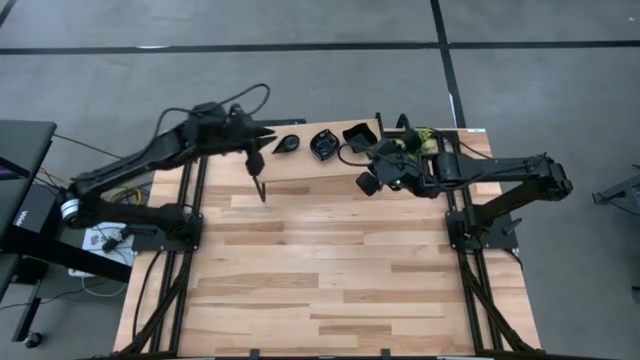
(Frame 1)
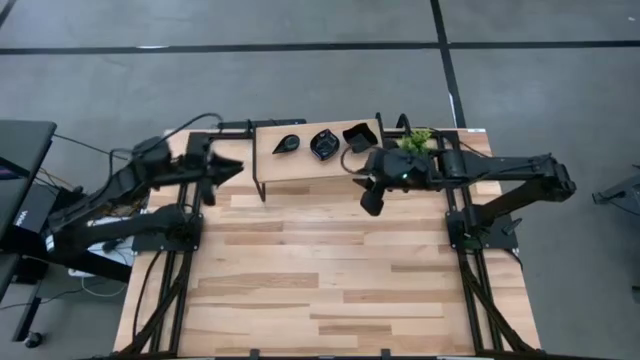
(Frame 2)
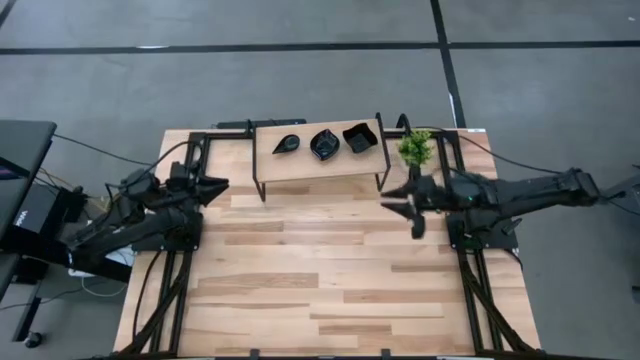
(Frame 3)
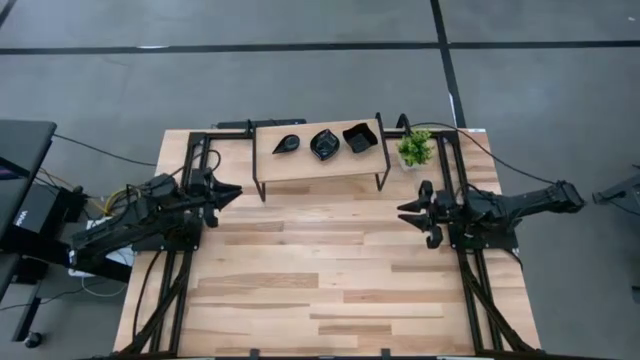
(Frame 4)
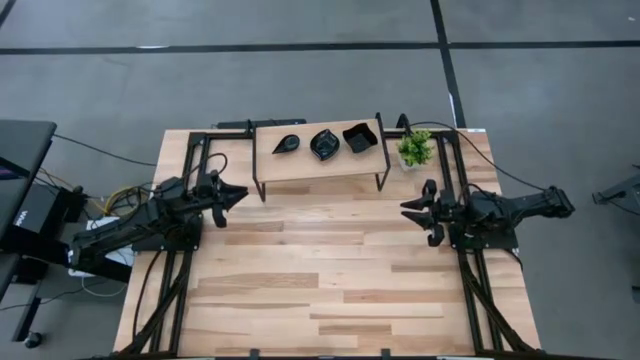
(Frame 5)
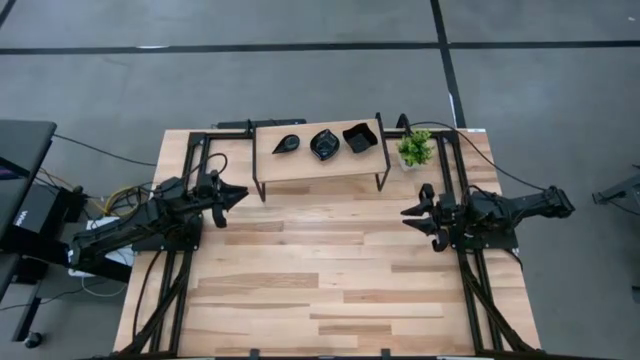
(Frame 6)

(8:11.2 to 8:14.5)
Task: Pick & Place Mini shaped plates
Return to Home Position

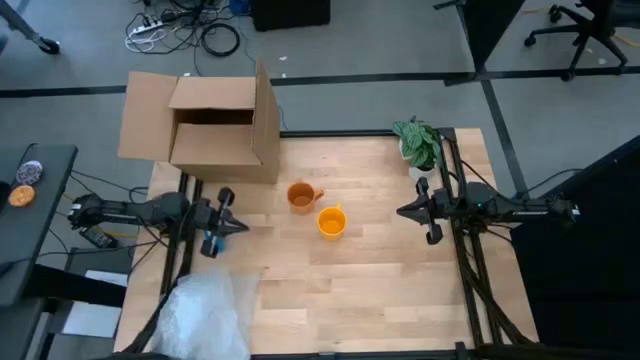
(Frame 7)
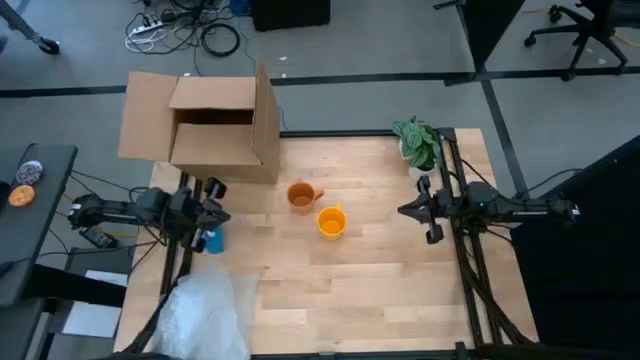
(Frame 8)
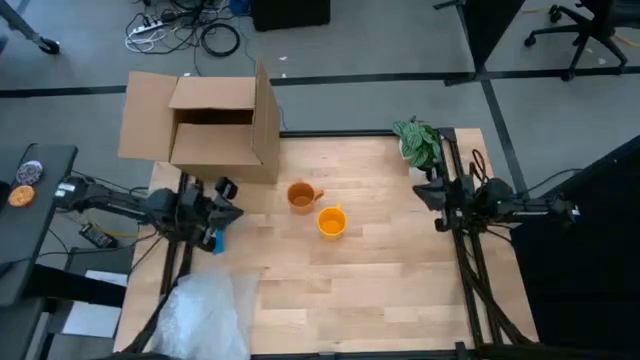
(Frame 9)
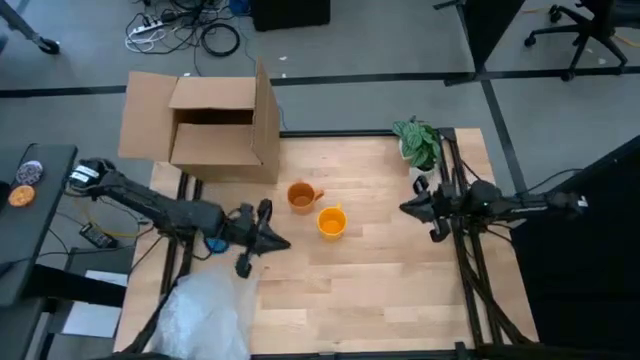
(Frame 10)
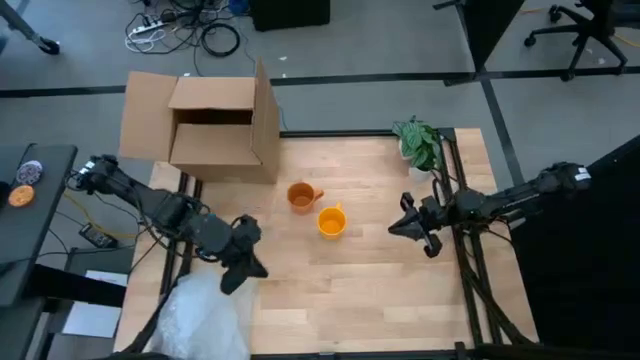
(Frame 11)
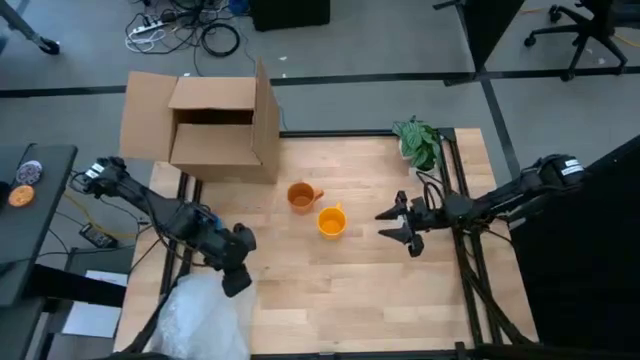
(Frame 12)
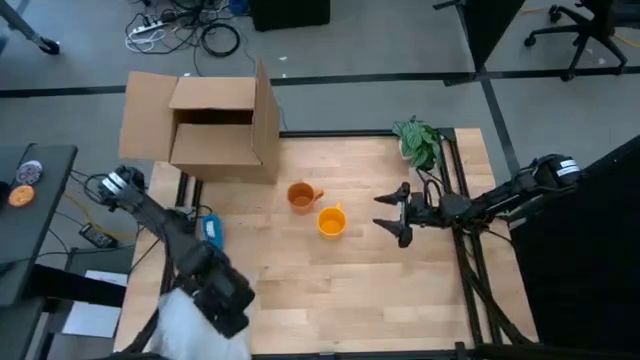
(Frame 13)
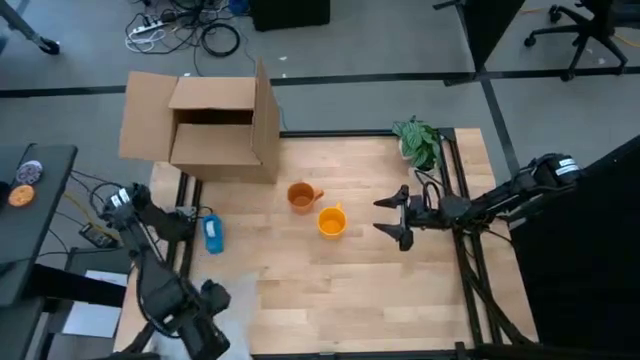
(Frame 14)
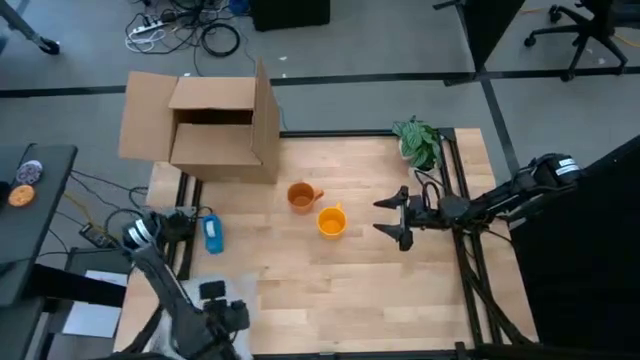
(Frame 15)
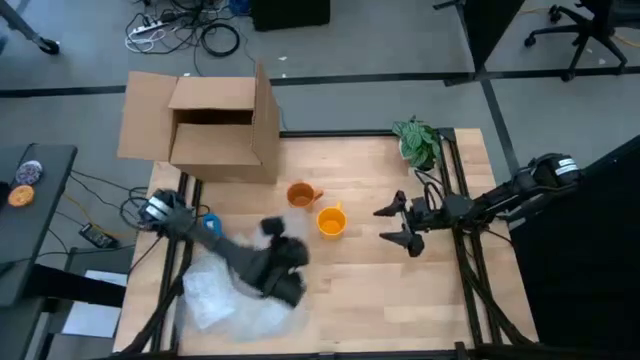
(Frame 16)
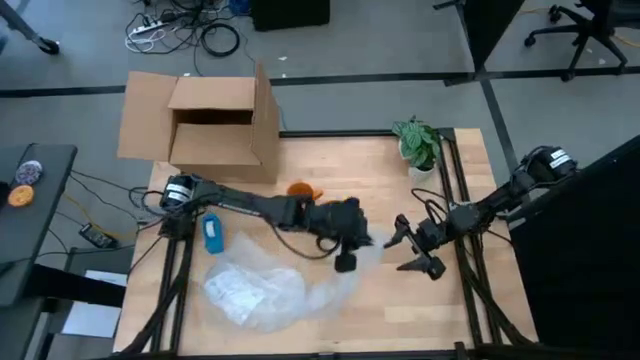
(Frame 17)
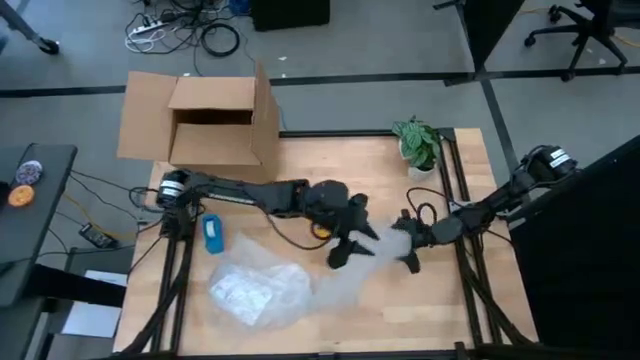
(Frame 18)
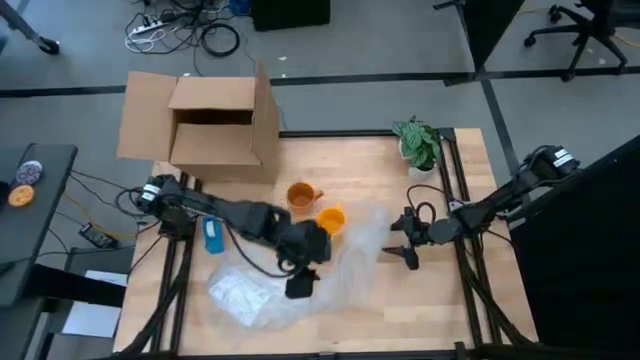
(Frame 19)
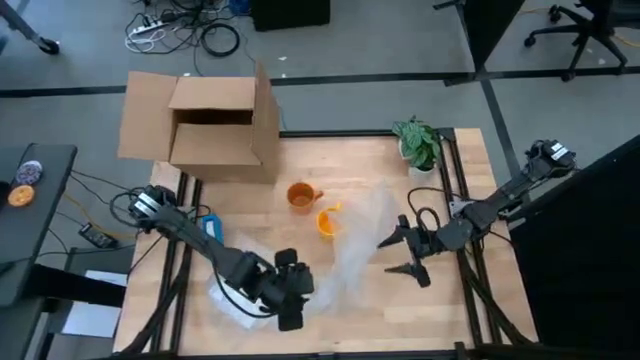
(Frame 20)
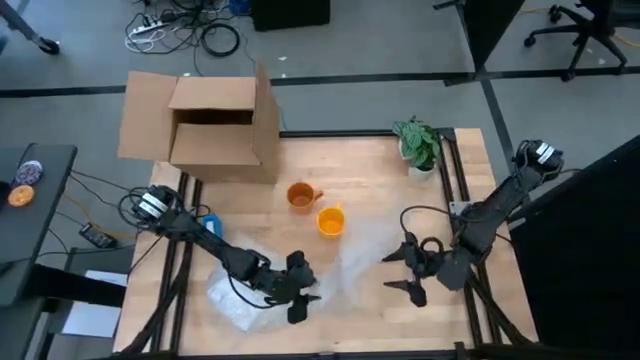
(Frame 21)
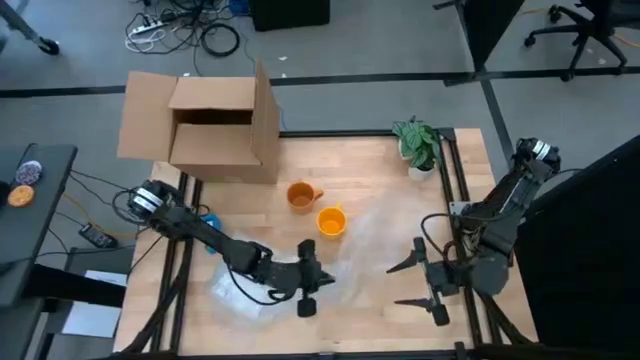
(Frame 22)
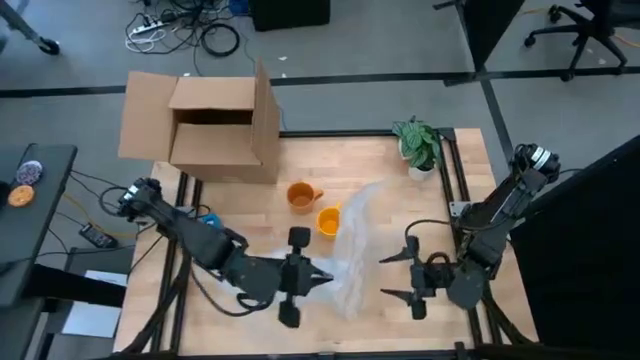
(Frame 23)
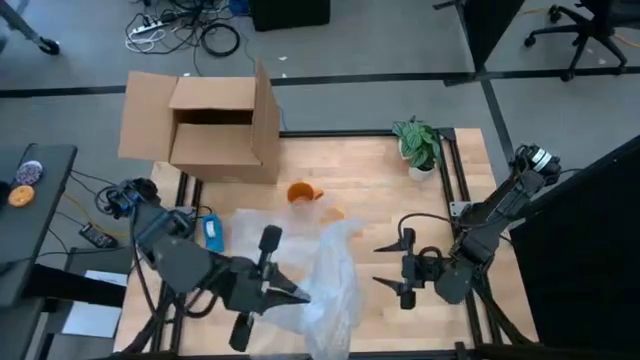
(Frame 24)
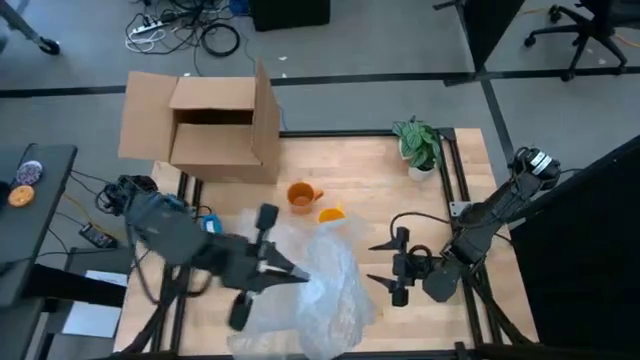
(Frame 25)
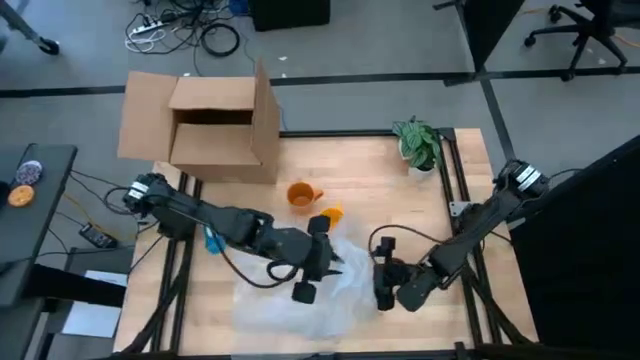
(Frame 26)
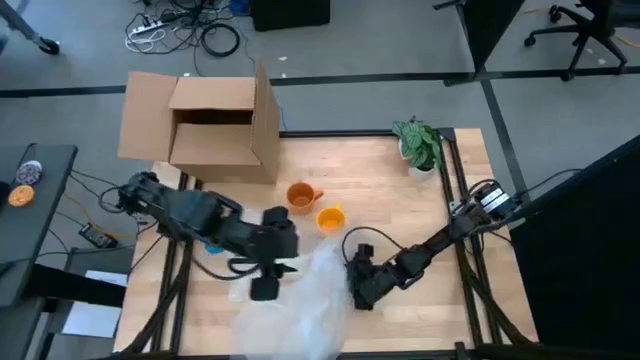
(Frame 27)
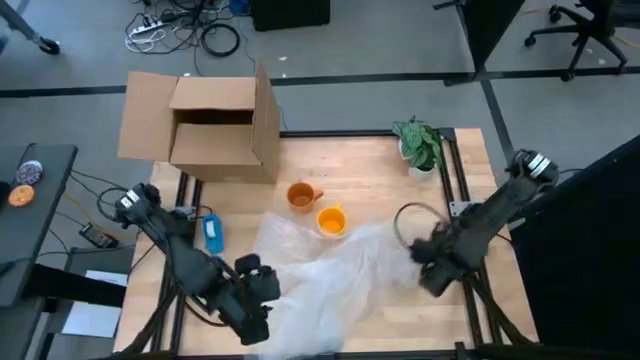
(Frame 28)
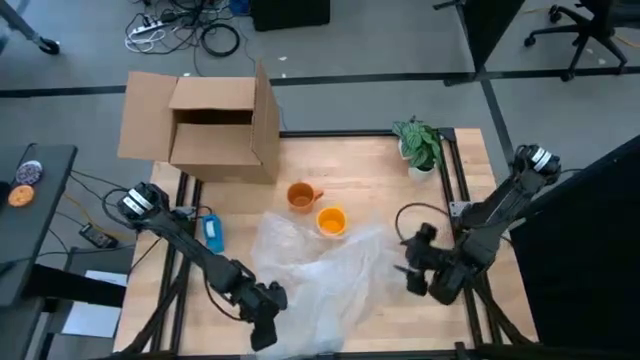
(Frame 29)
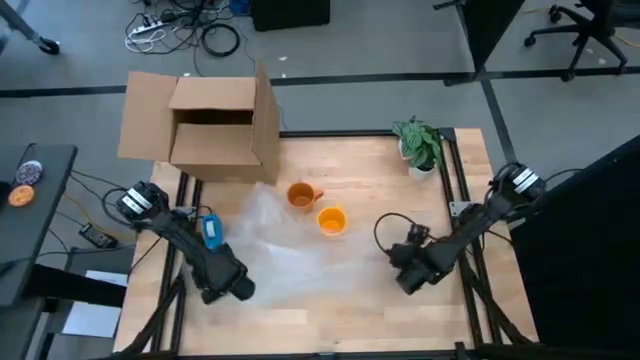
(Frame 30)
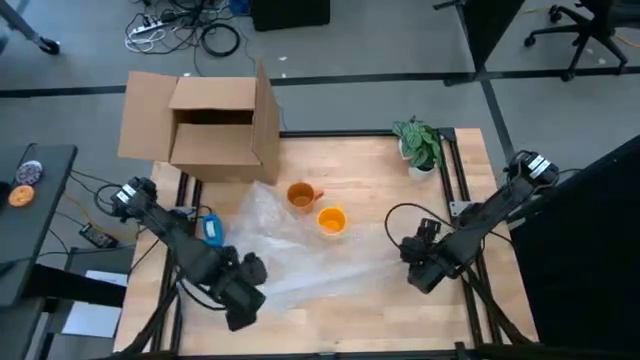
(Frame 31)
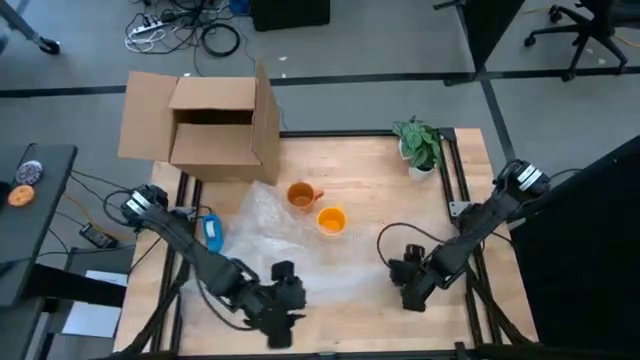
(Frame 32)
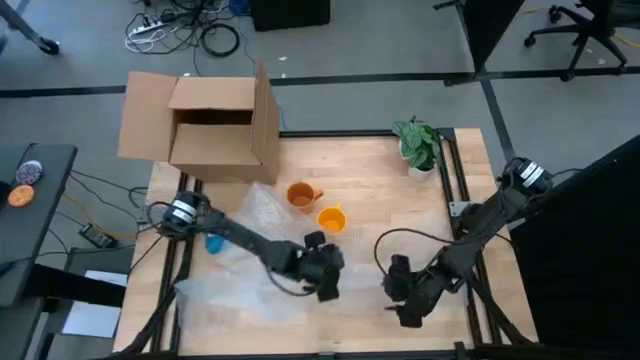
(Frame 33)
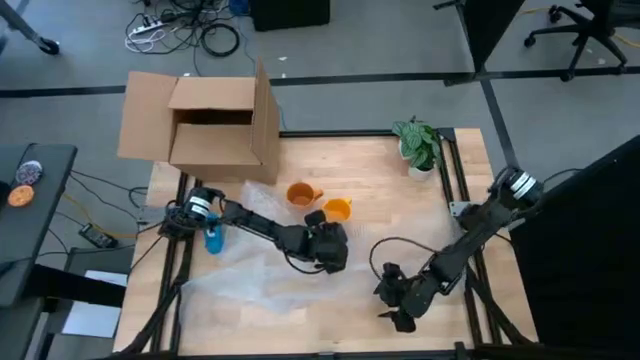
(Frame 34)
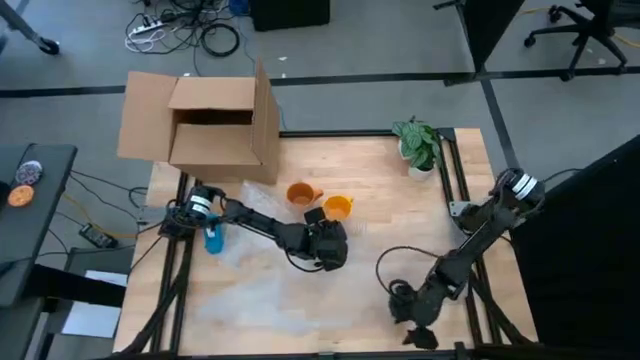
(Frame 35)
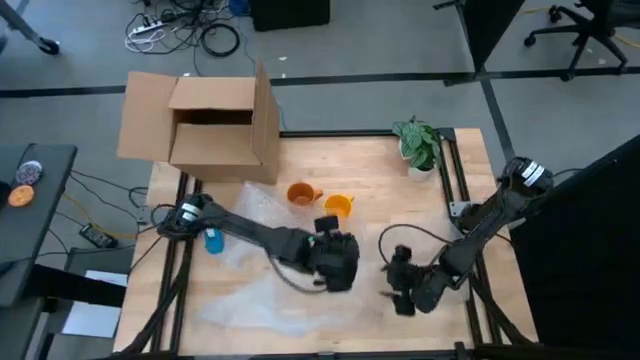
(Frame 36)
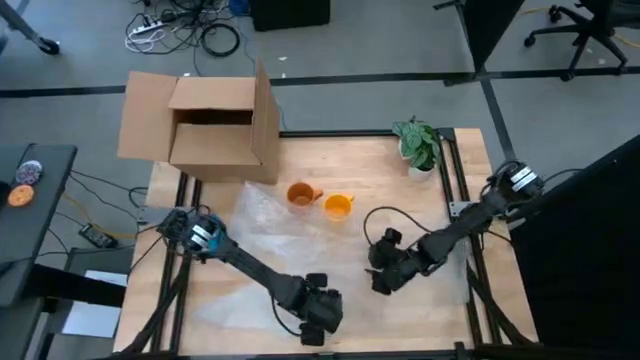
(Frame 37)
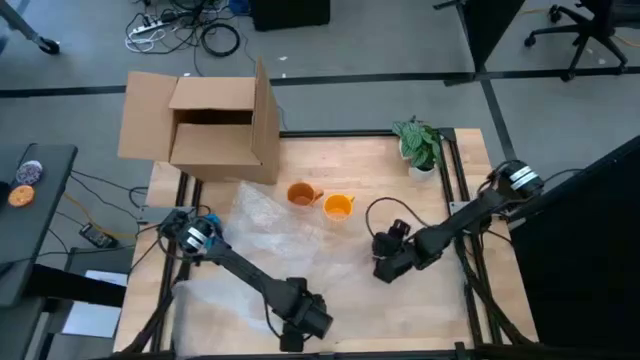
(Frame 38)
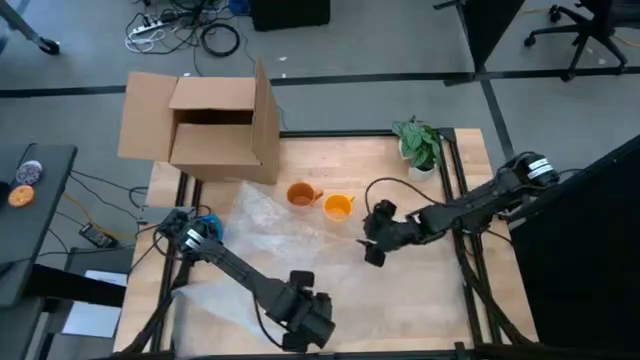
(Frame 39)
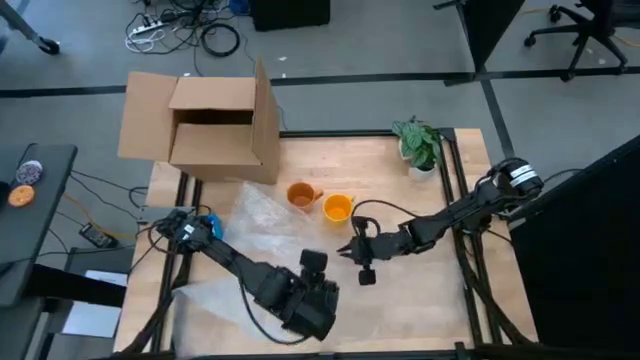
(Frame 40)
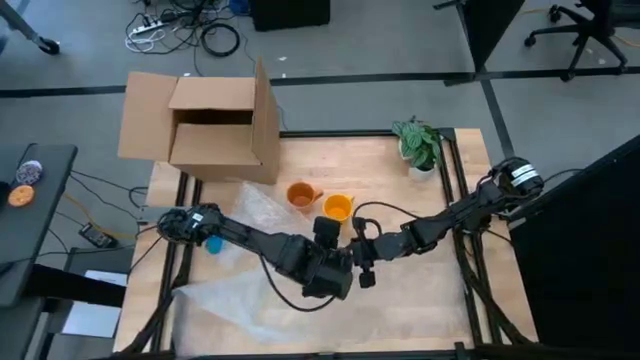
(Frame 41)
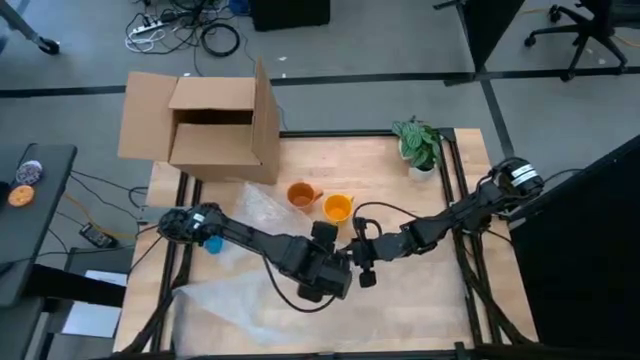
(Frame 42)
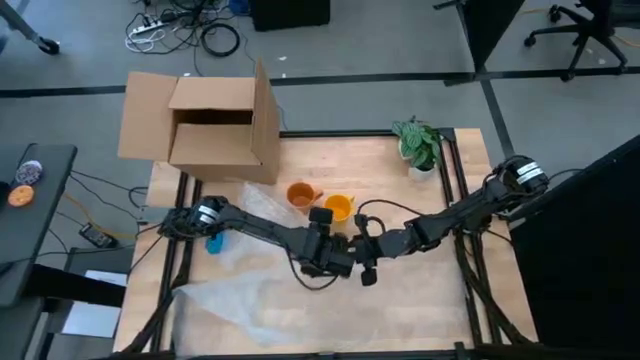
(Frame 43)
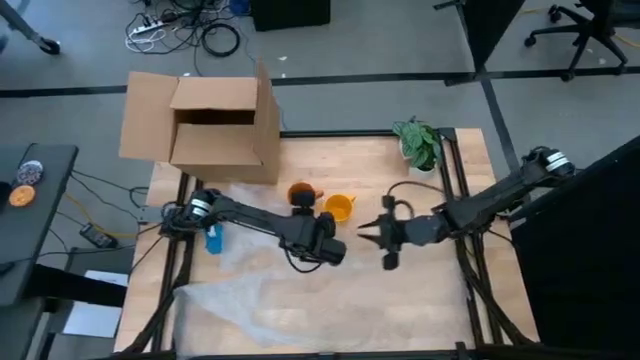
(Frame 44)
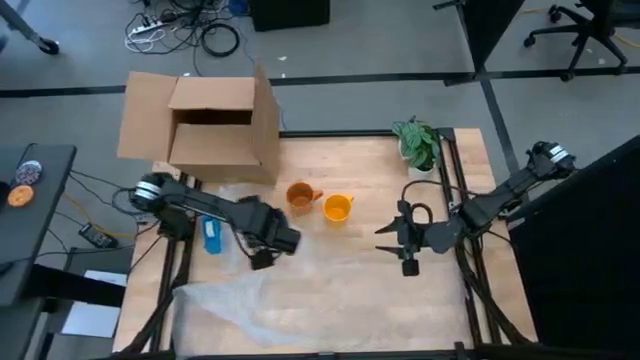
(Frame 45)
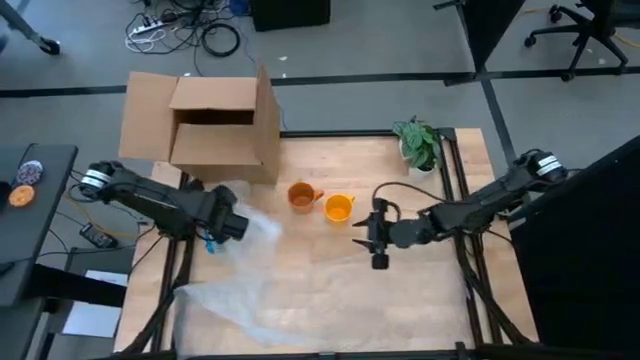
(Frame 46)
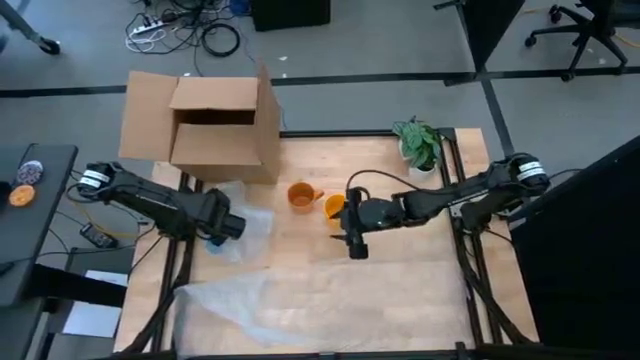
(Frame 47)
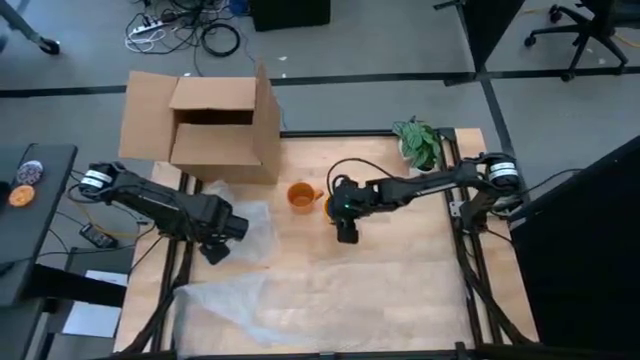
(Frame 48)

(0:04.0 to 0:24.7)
Task: wrap mug
Wrap the yellow mug using the transparent bubble wrap
